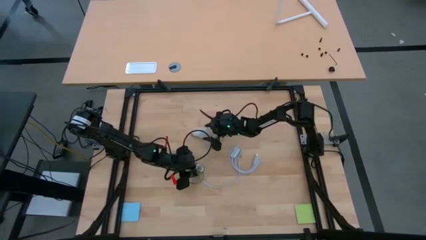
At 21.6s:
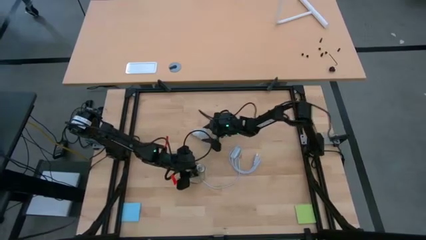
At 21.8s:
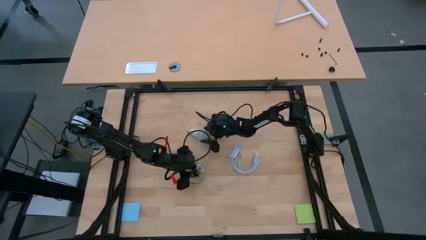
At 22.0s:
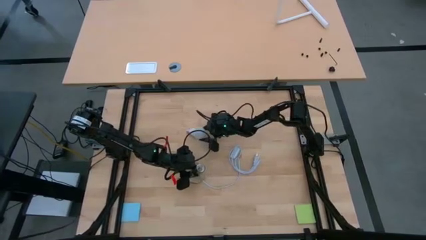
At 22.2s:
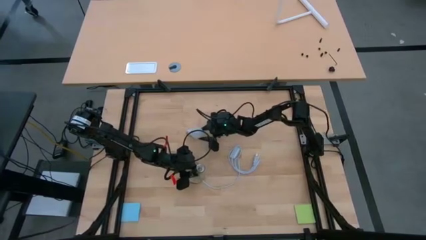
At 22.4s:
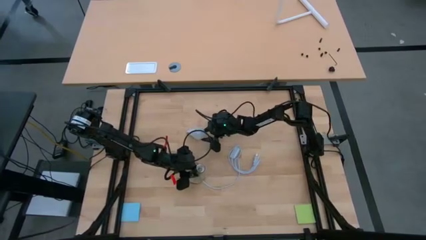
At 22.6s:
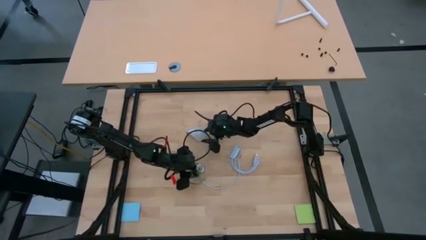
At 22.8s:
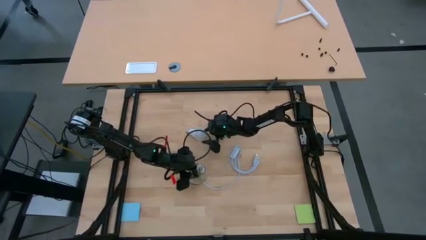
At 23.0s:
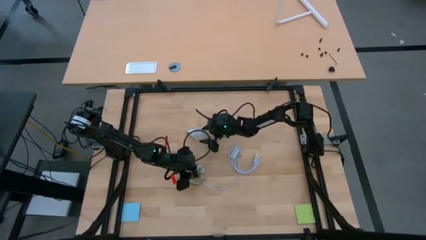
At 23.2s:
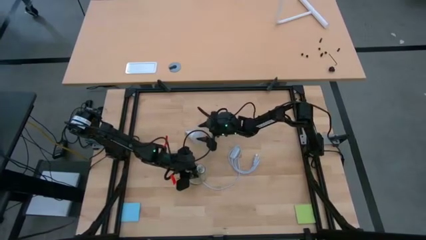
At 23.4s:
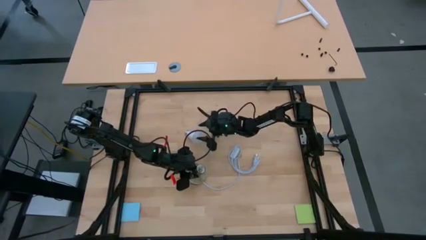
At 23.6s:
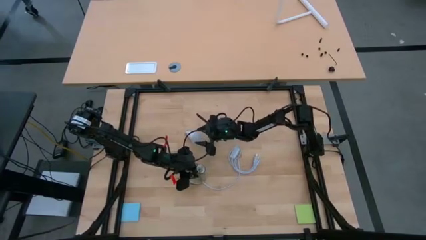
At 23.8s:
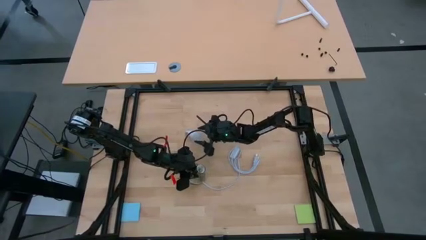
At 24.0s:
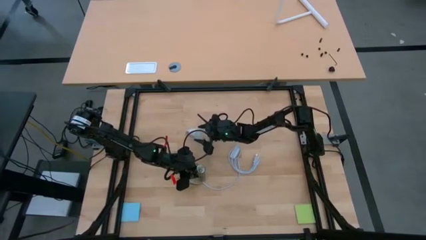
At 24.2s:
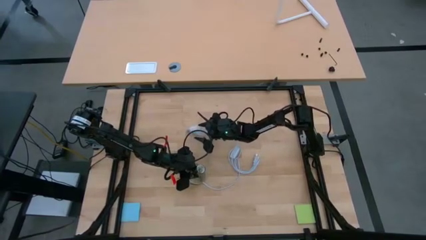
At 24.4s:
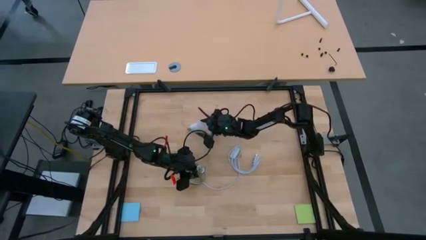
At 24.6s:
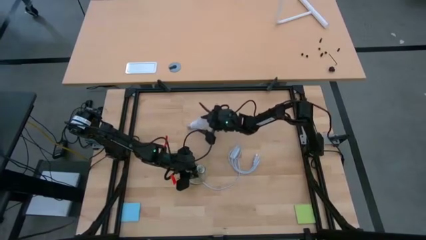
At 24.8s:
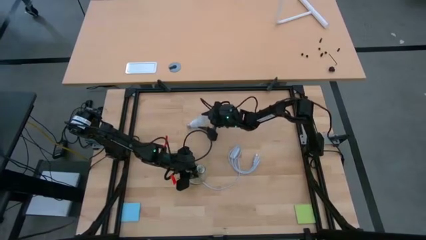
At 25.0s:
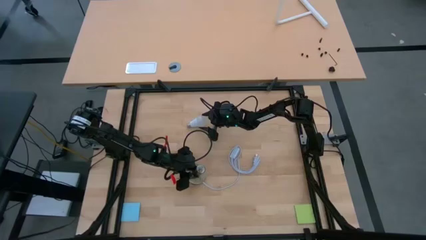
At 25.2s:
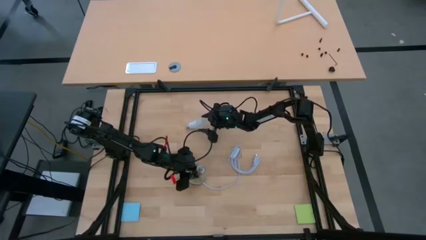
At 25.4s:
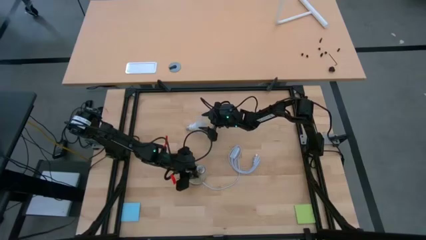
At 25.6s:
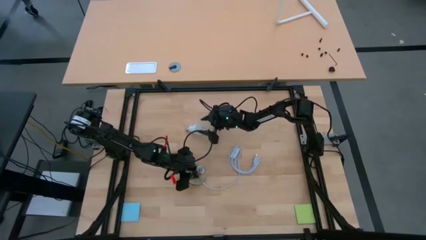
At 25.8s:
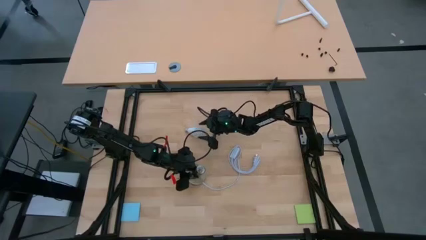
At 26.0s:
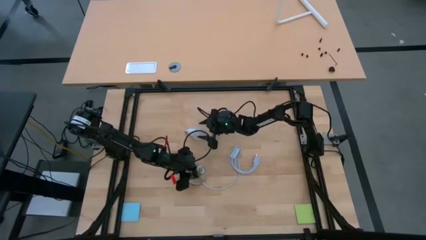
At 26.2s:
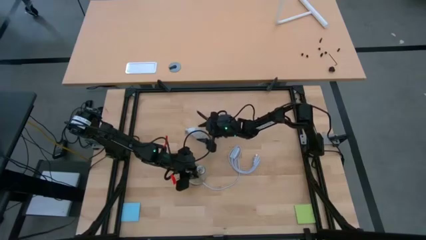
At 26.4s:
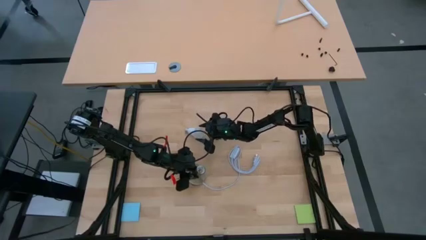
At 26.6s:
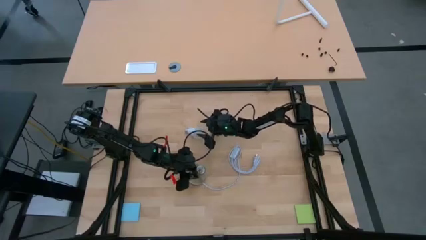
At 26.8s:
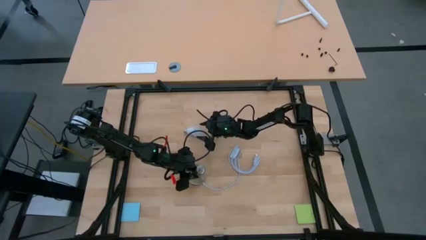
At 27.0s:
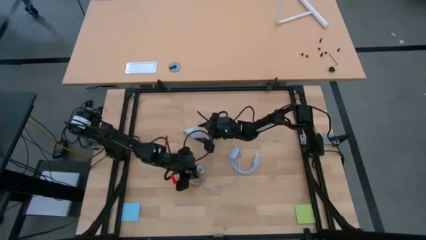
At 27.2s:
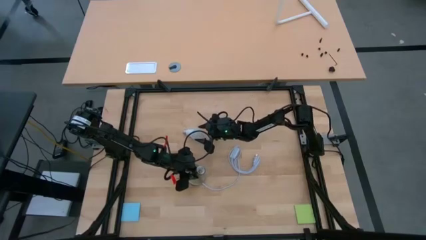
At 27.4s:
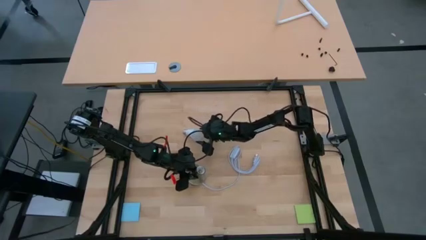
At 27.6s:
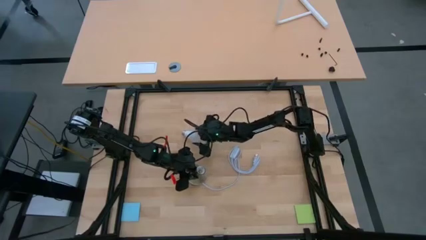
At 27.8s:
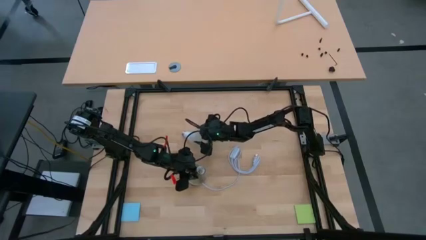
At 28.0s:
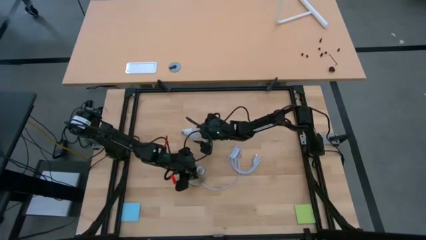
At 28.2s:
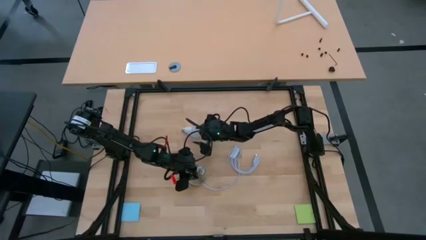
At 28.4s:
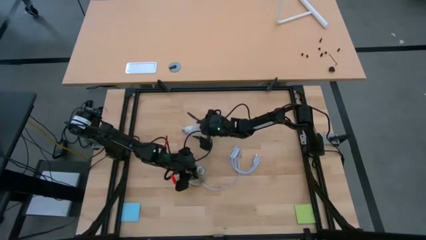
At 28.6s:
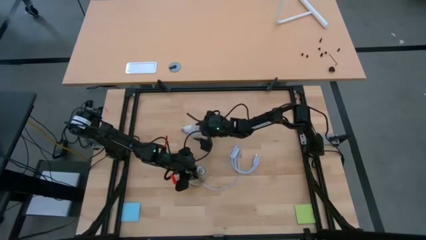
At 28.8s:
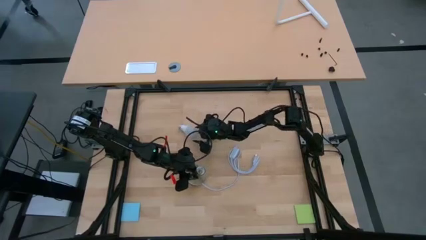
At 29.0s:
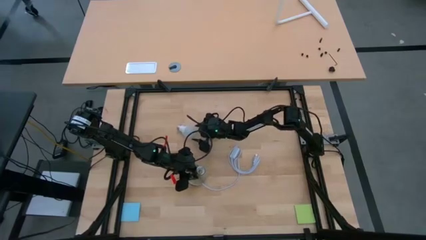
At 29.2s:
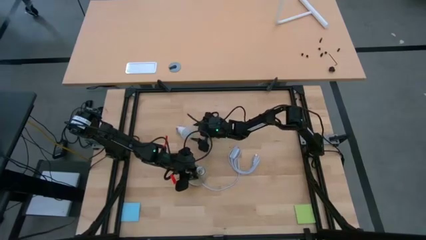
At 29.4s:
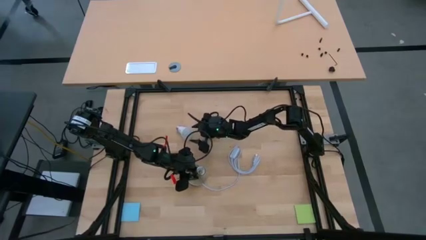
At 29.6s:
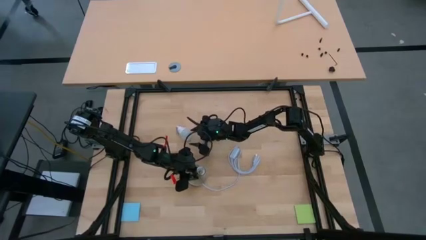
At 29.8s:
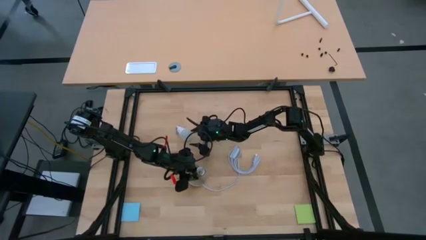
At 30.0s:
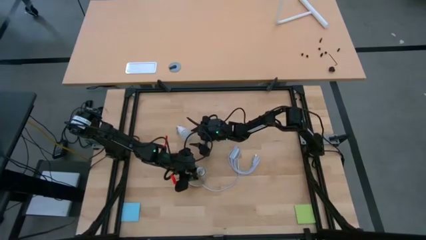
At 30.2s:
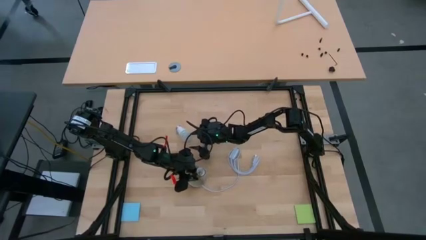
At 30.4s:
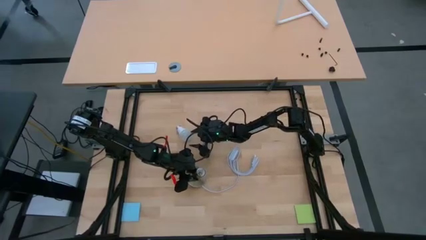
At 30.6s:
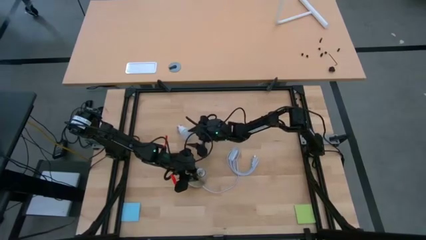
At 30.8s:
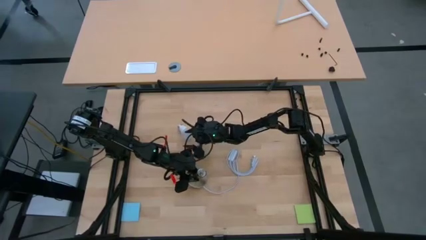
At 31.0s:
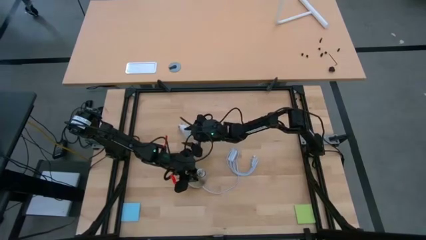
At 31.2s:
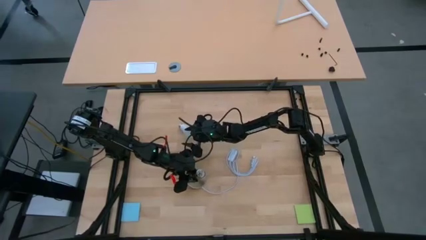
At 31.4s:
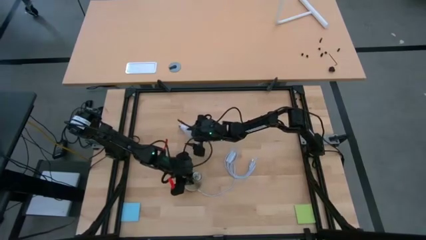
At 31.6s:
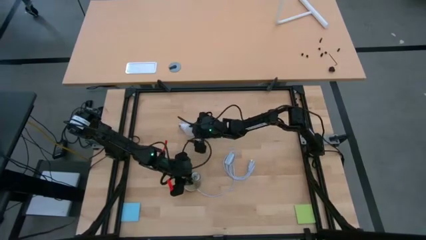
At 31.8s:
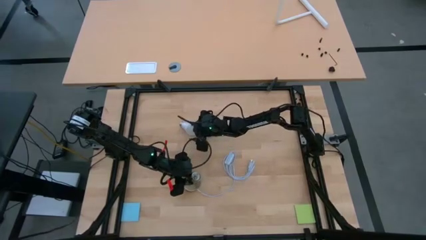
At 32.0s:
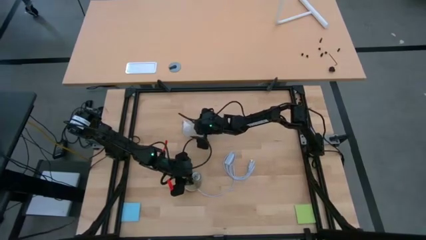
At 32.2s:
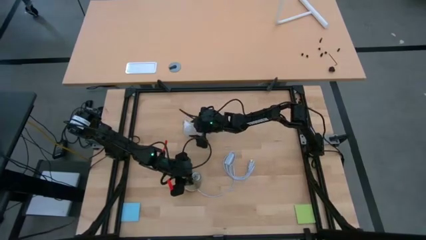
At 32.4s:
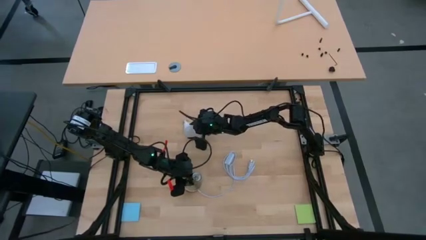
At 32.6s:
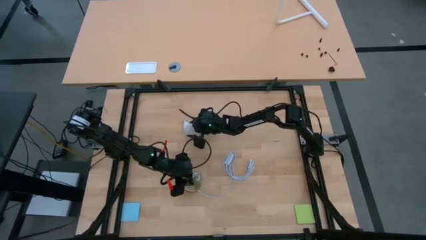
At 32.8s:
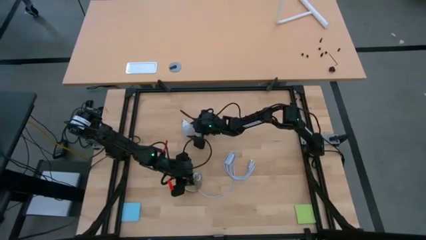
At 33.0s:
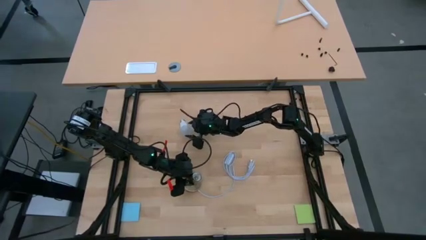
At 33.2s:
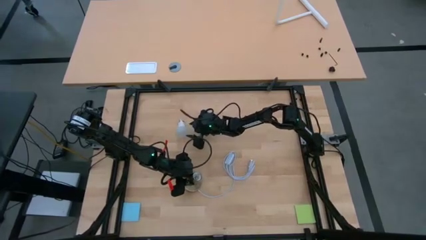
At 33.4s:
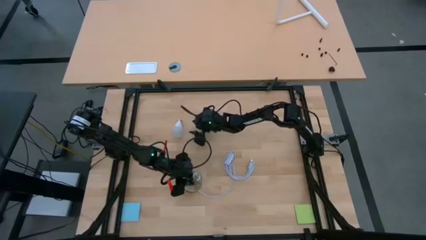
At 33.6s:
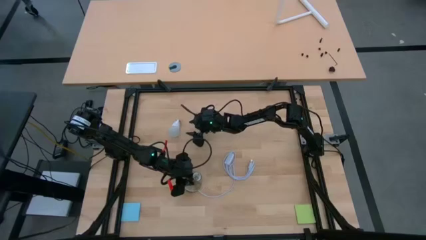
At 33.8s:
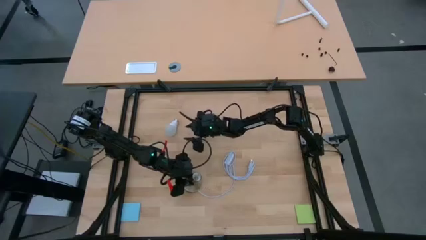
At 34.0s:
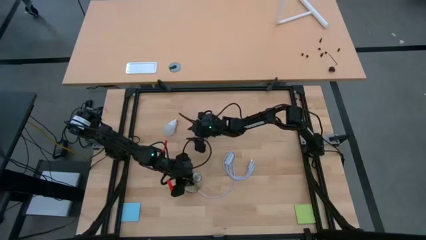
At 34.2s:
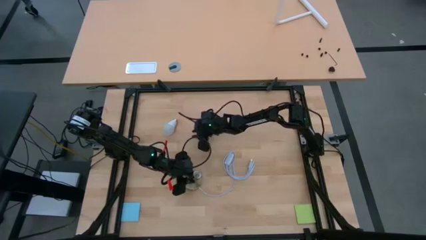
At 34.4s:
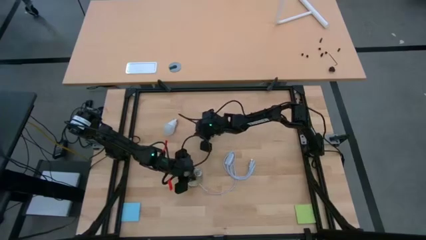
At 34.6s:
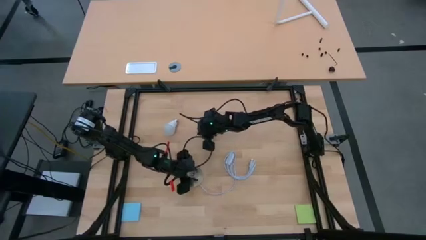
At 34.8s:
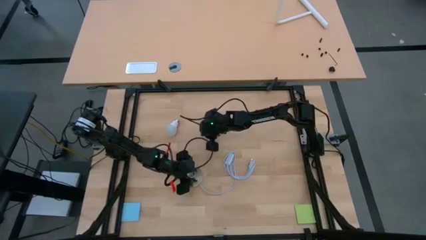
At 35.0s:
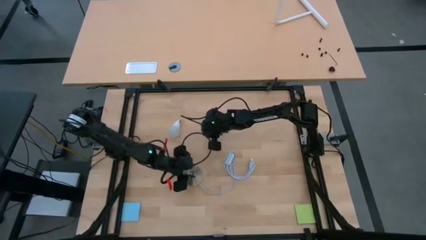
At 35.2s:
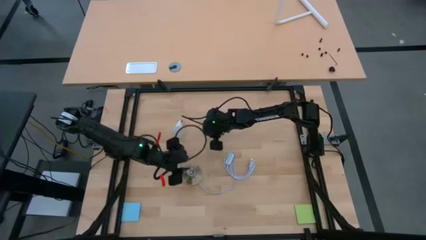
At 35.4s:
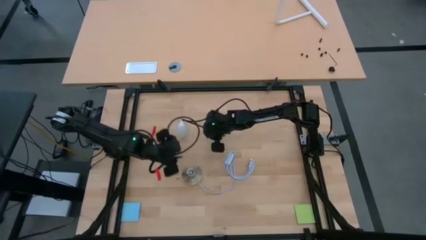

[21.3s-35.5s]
Task: Screw lightbulb
Insert the white lightbulb into the golden lamp

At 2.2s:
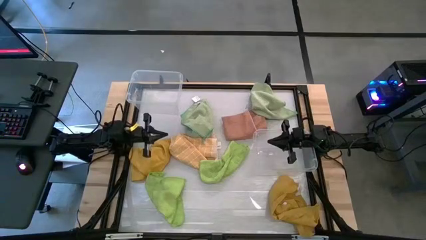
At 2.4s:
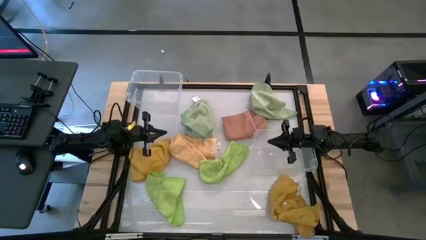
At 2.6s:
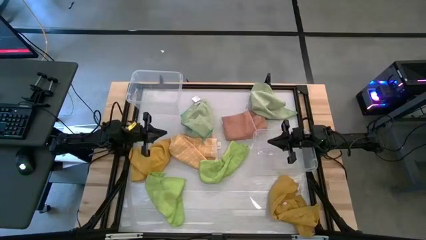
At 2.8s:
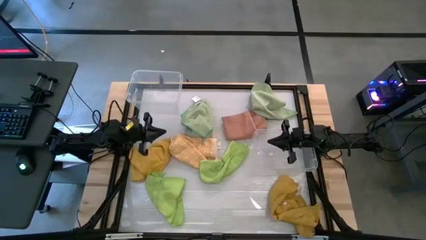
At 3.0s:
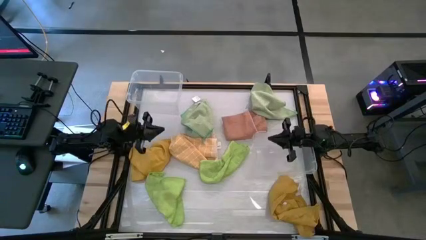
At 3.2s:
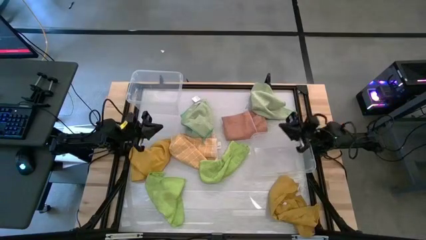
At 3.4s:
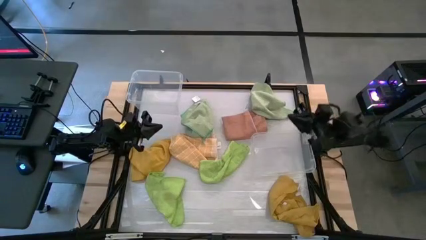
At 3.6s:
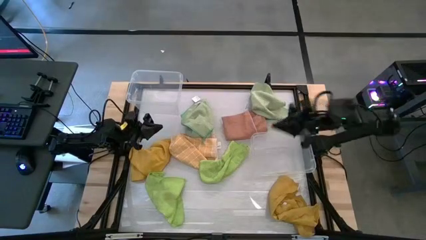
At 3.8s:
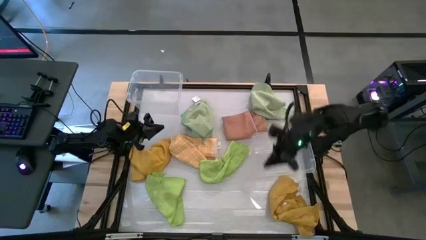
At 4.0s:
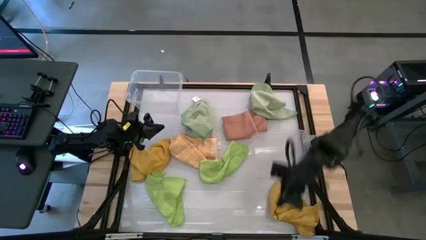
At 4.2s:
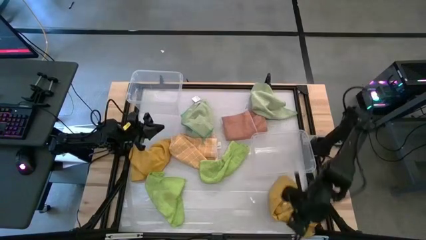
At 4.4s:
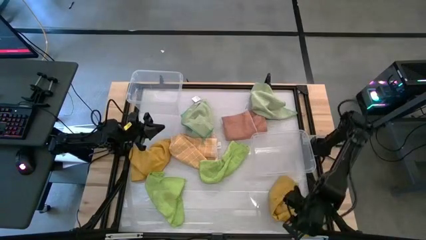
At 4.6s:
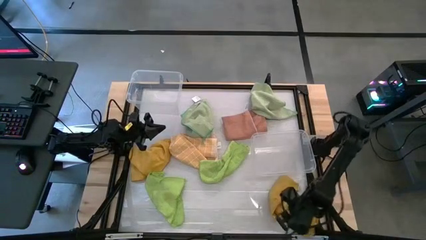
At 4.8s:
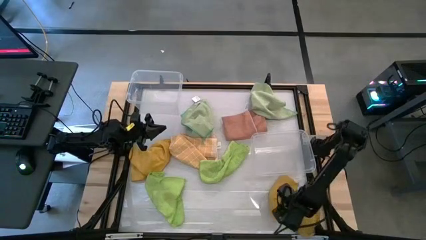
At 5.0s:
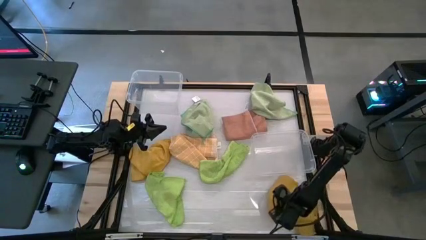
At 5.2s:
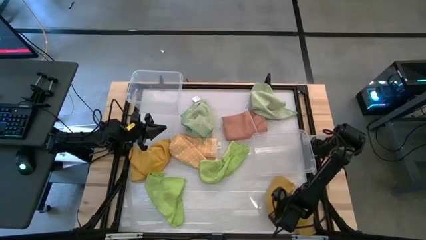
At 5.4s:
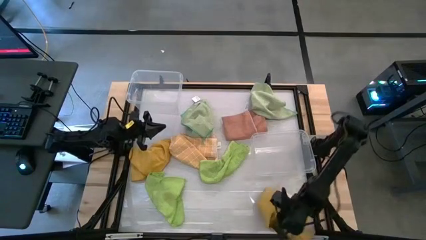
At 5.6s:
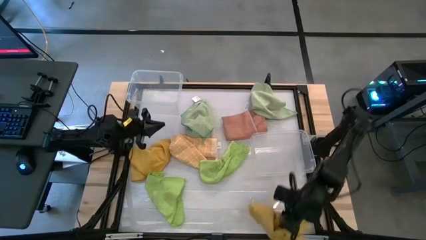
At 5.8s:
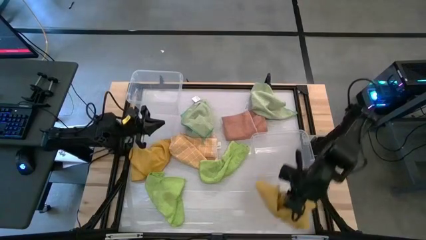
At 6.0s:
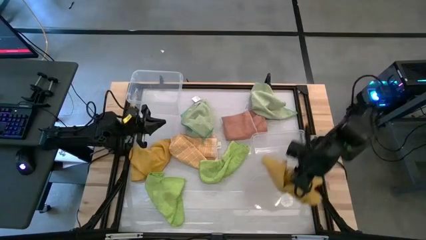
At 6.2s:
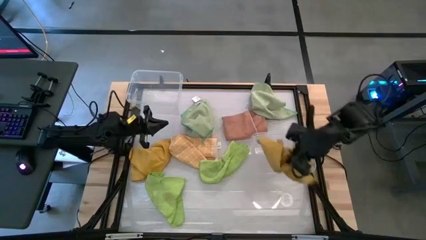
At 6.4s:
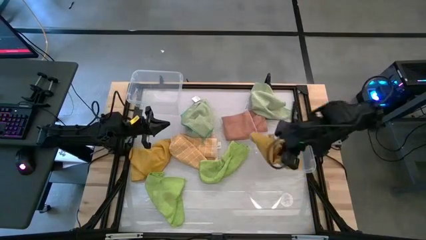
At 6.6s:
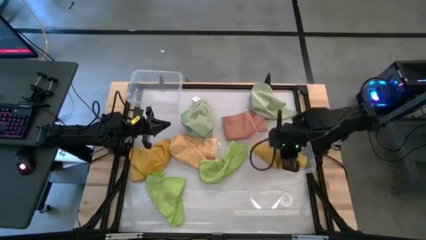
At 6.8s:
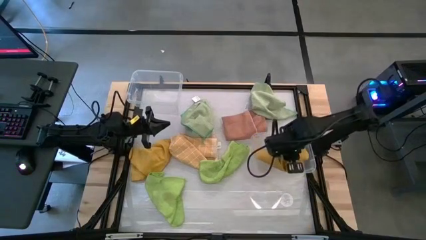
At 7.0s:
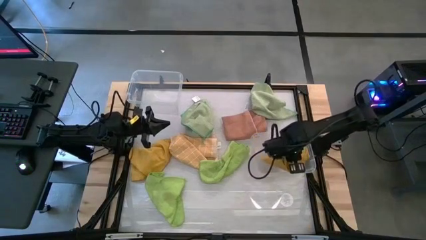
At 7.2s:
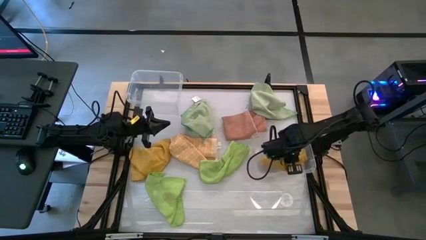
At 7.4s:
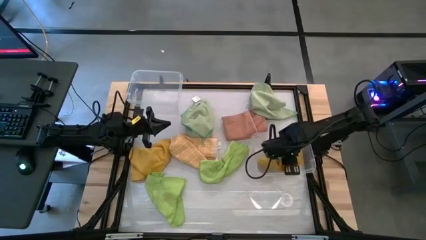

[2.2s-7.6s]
Task: Sort towels by color in basket
Put the right yellow towel into the right transparent bin
